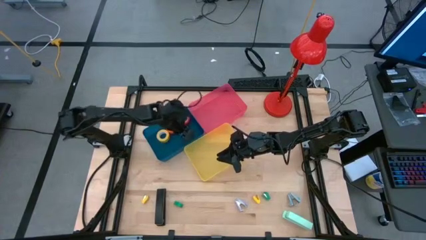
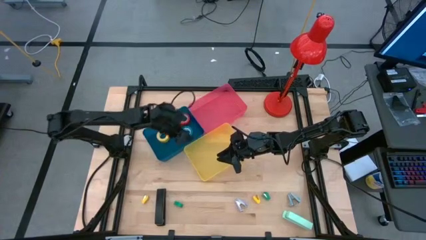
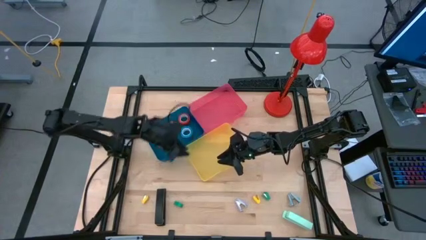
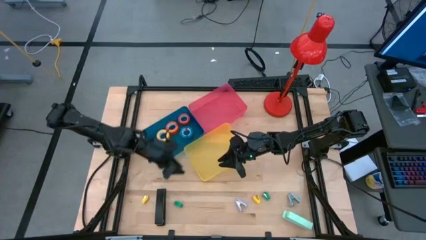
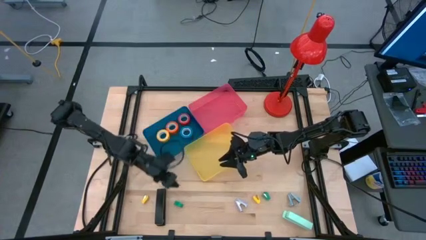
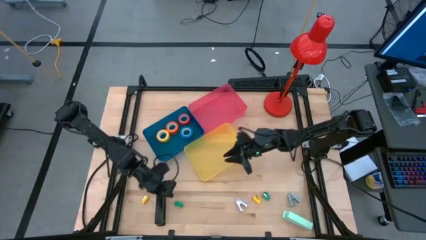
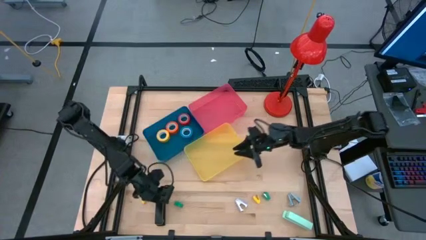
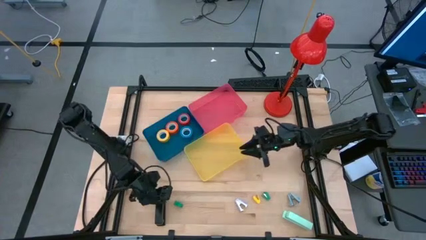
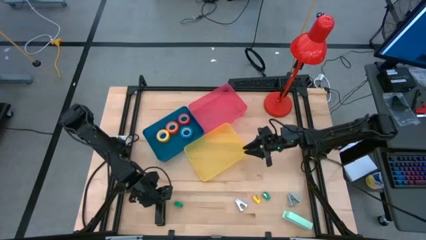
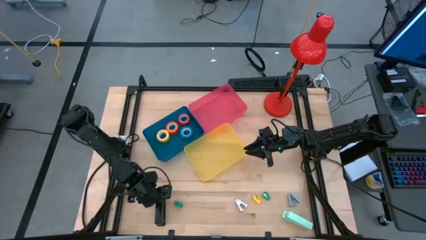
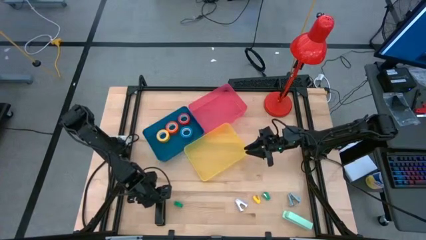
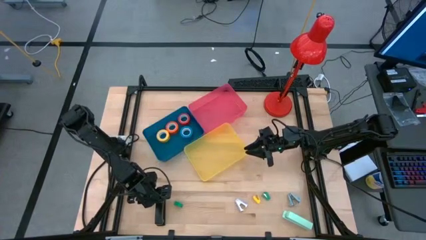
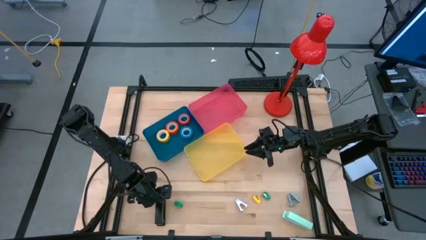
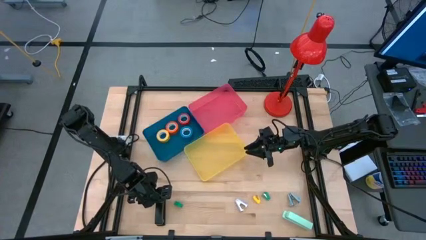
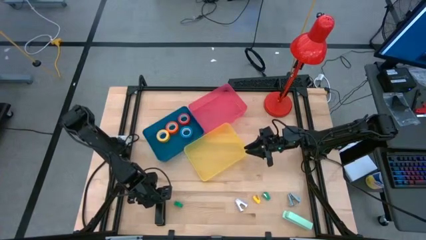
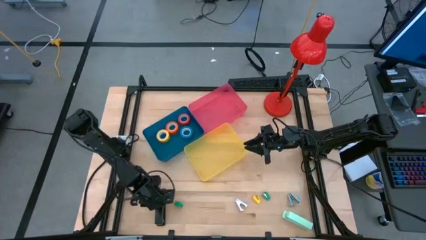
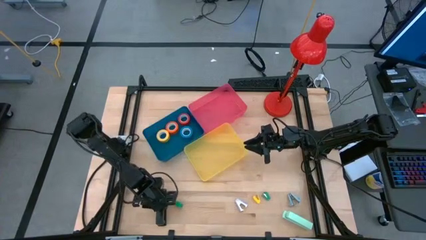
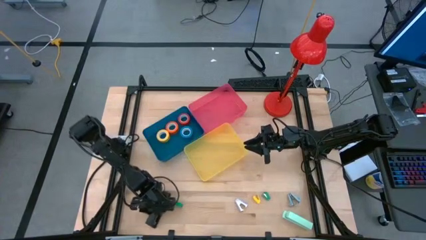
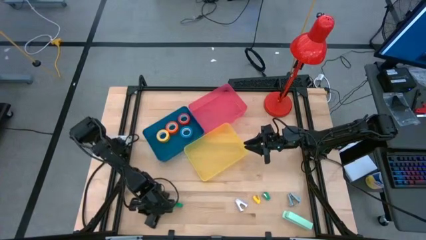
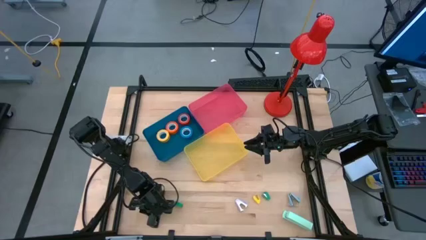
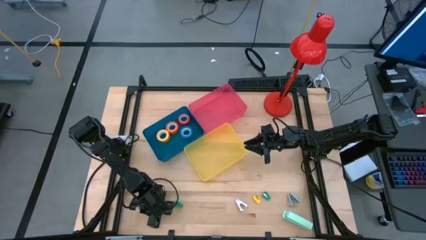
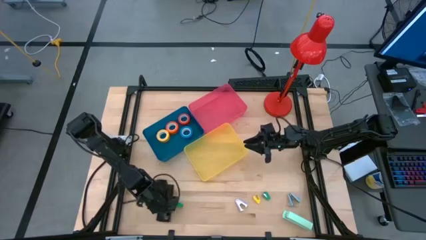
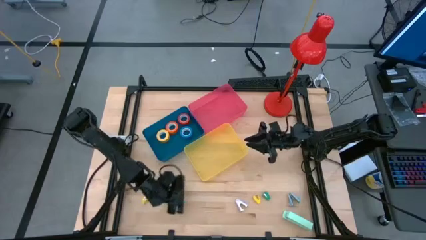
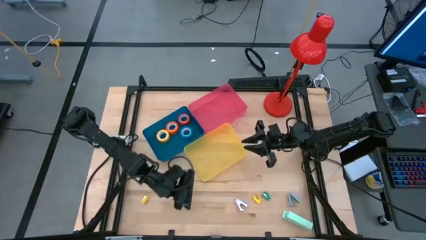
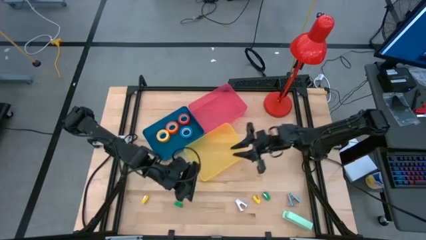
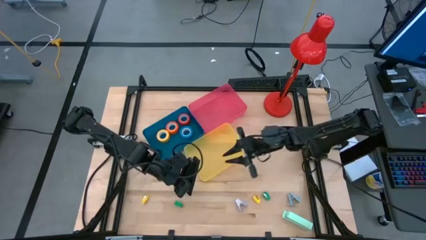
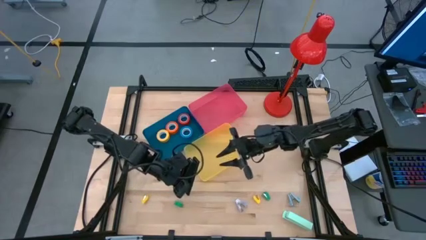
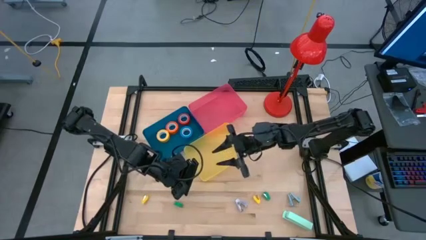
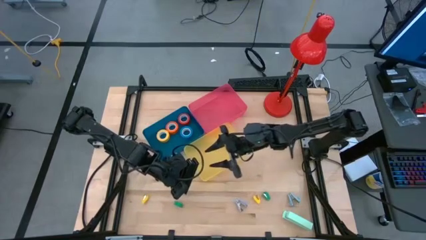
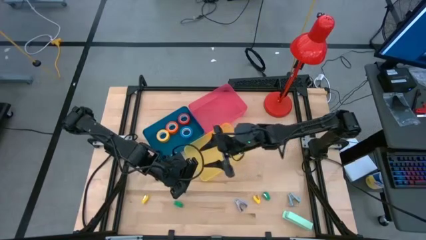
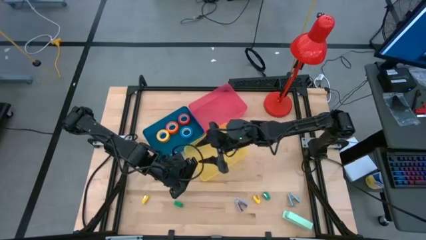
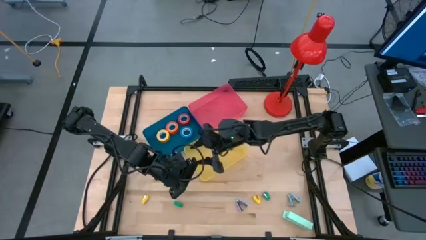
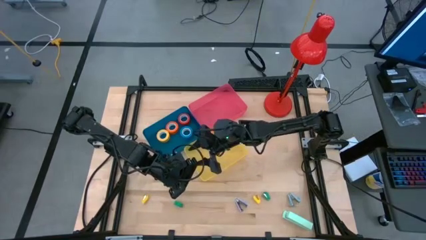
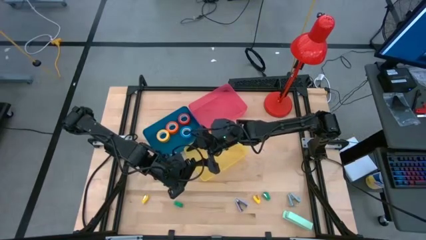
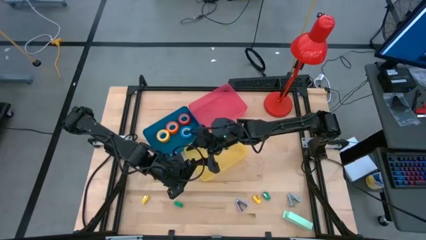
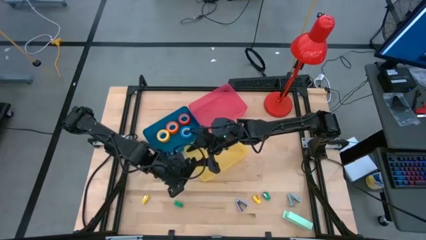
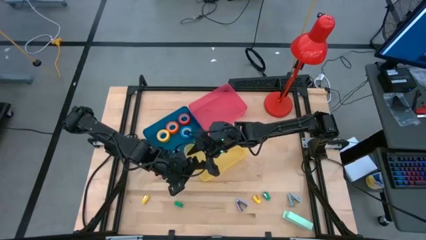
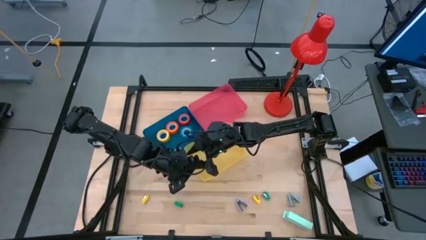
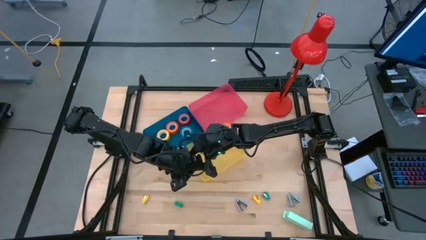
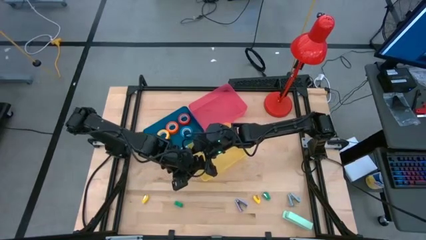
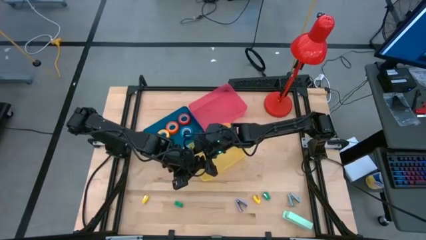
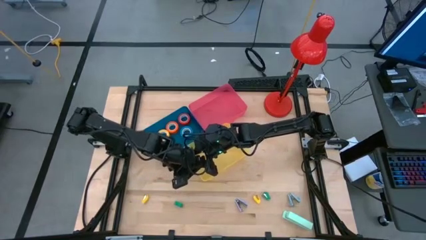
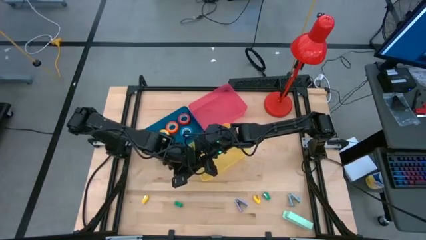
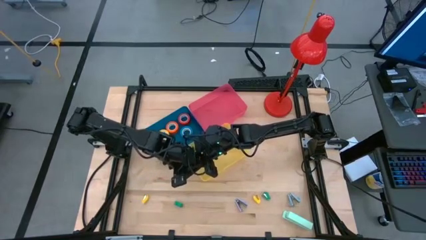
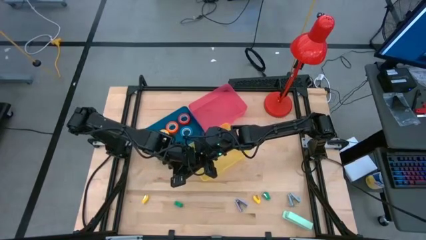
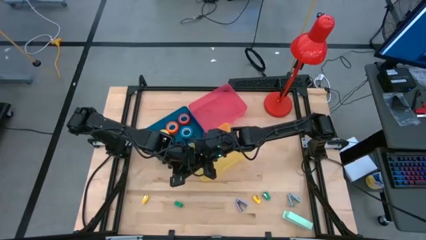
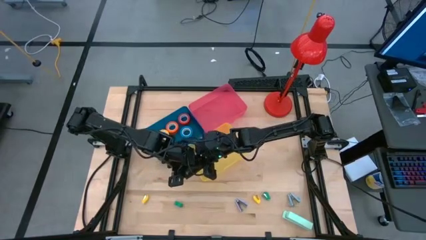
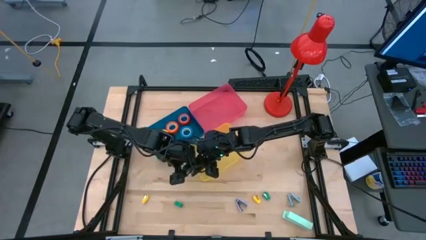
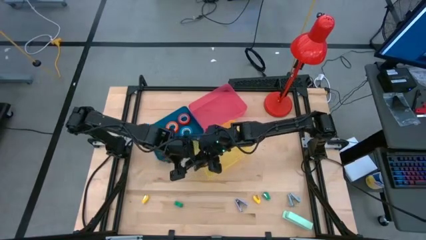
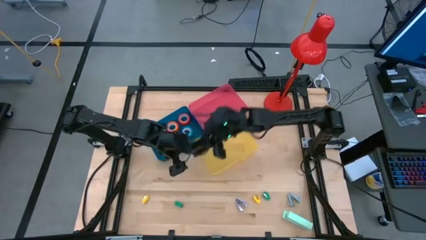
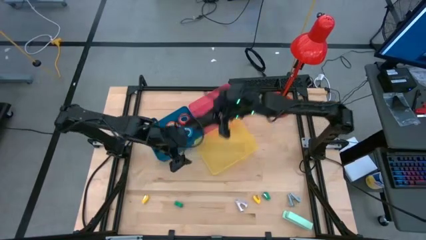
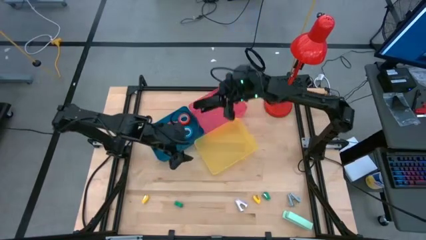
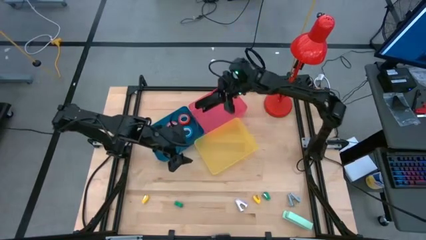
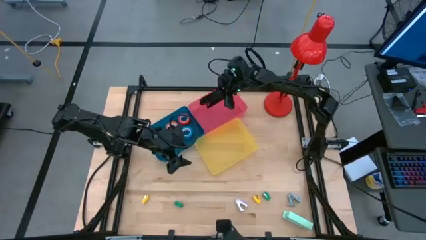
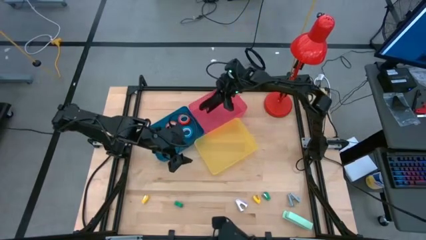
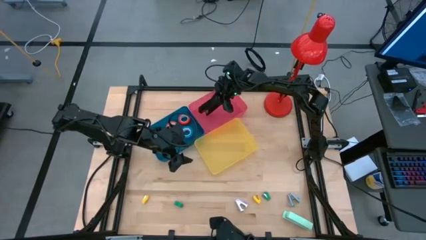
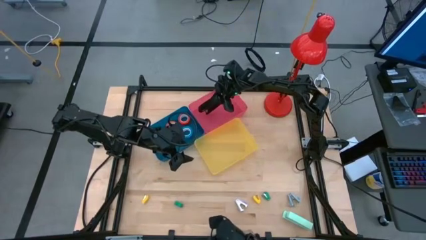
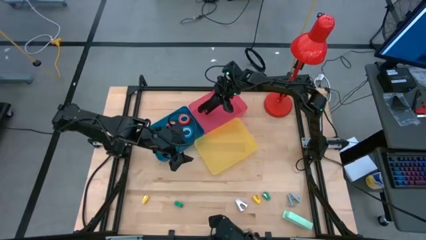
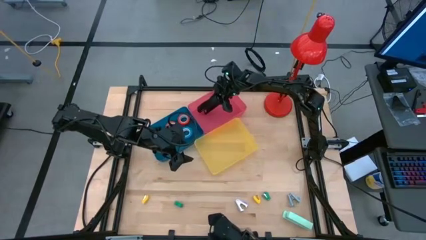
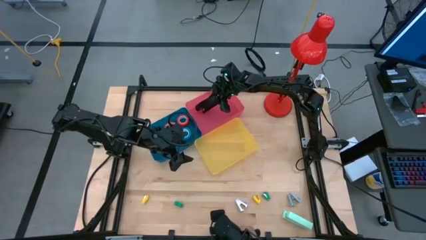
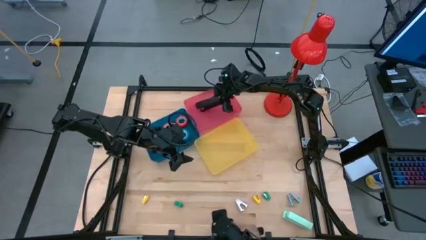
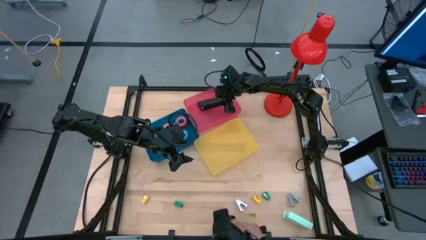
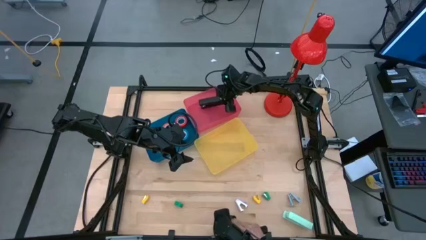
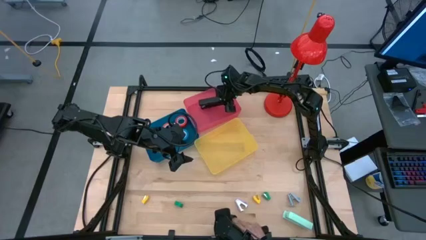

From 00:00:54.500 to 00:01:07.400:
Task: Pick and place Stapler, Stapler remover, tape
Put the black stapler into the pink bin

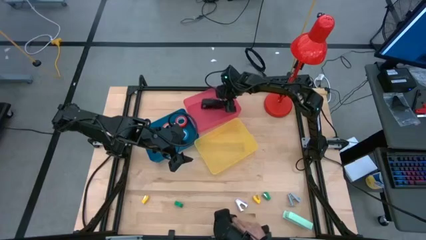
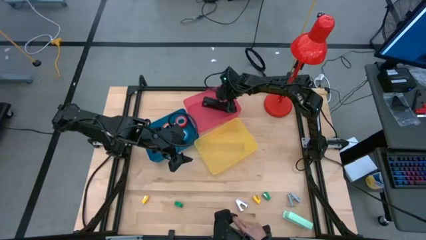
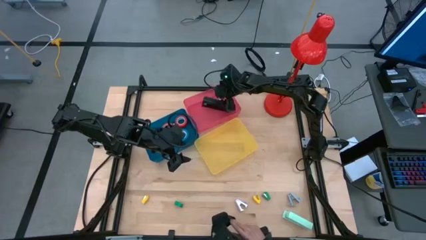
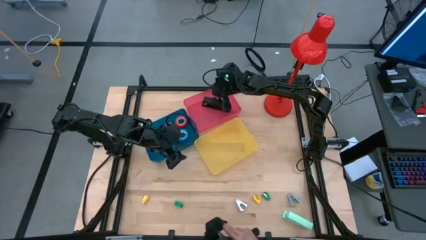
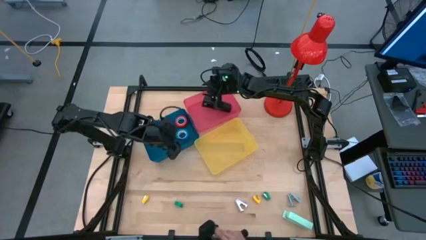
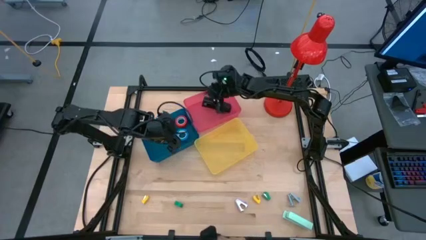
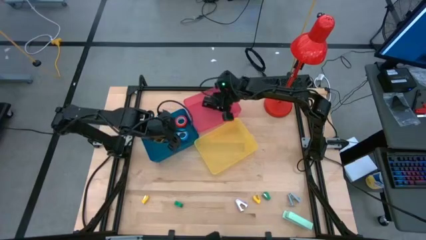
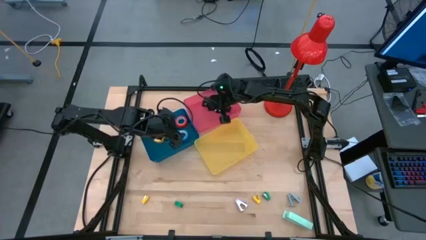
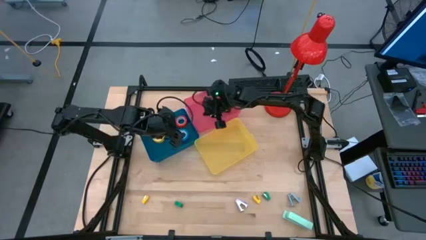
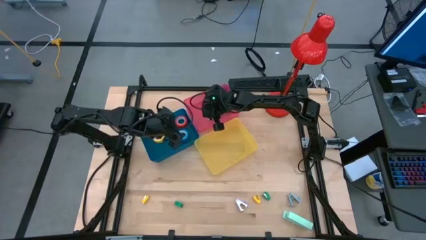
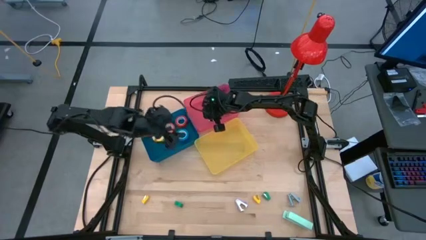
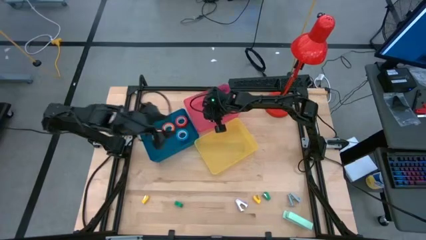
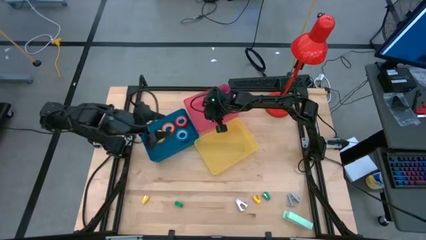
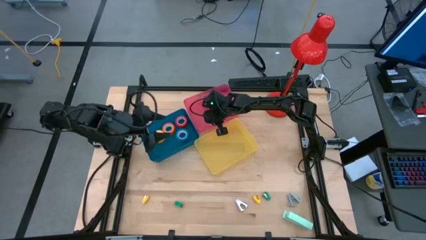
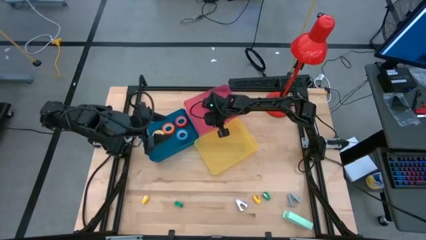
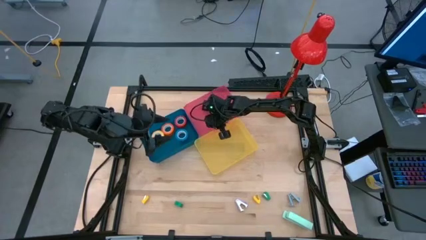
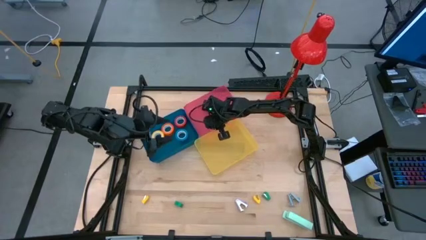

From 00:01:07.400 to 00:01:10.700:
Adjust the pink bin
